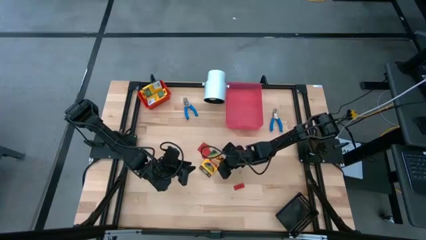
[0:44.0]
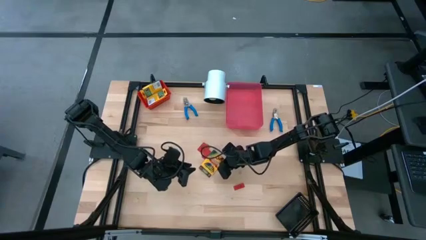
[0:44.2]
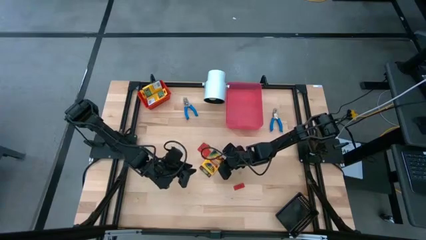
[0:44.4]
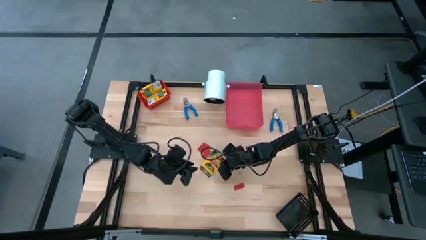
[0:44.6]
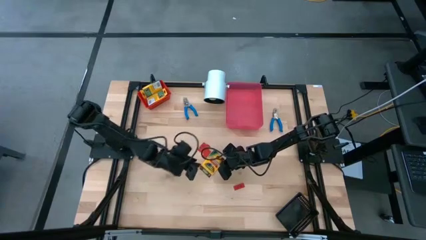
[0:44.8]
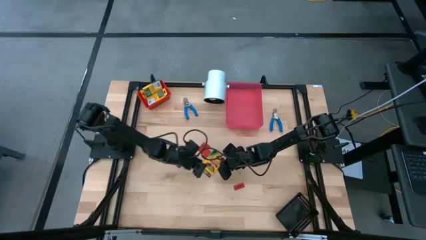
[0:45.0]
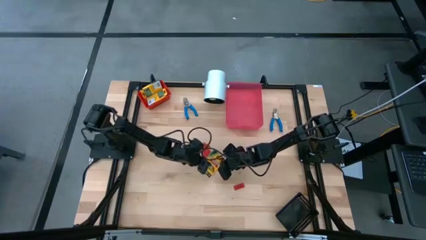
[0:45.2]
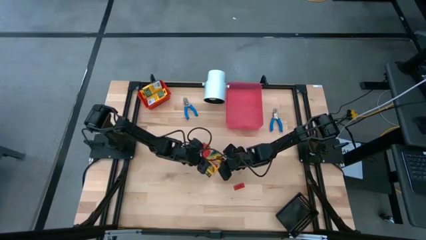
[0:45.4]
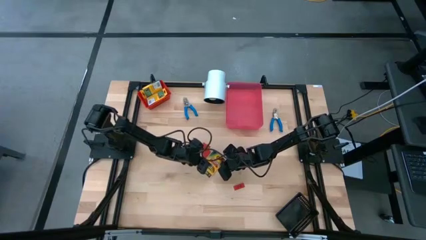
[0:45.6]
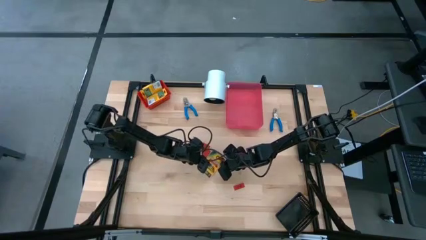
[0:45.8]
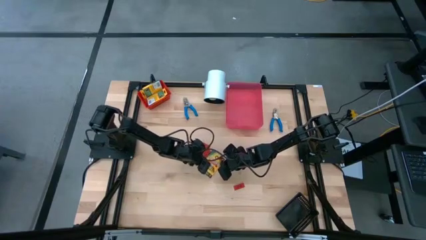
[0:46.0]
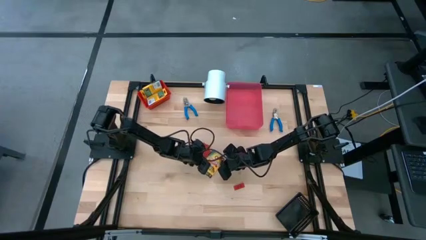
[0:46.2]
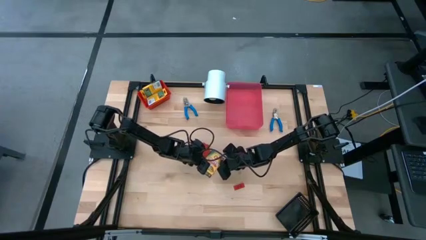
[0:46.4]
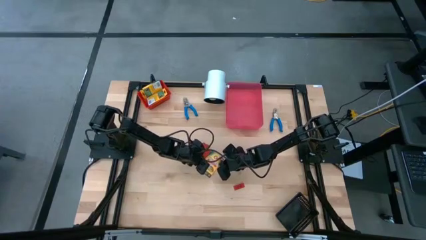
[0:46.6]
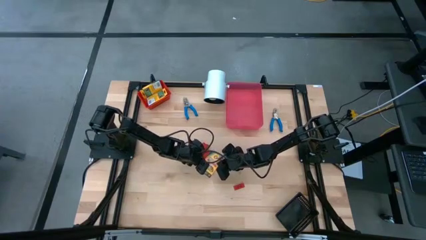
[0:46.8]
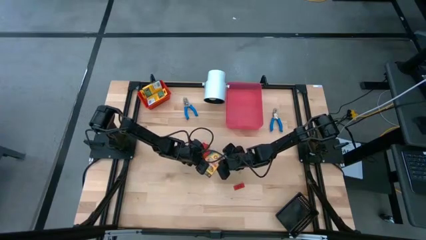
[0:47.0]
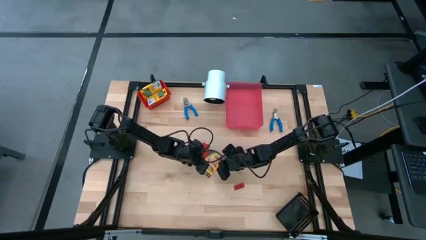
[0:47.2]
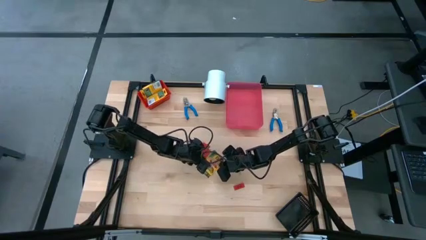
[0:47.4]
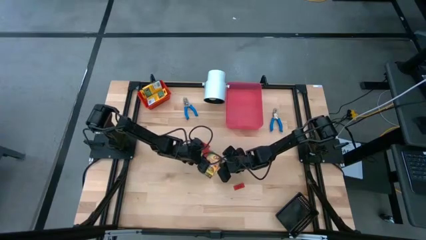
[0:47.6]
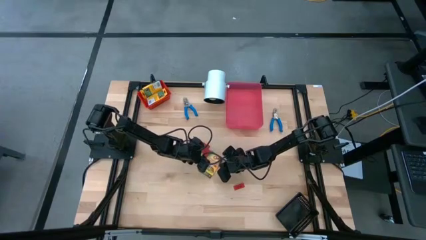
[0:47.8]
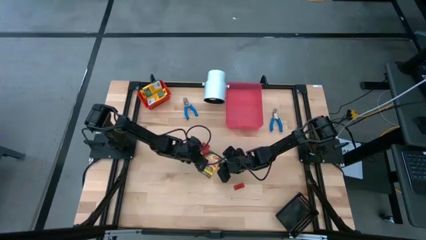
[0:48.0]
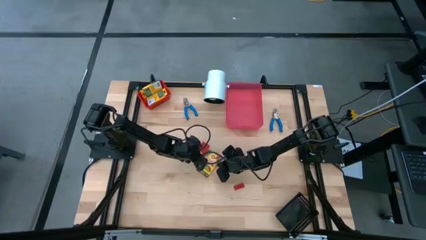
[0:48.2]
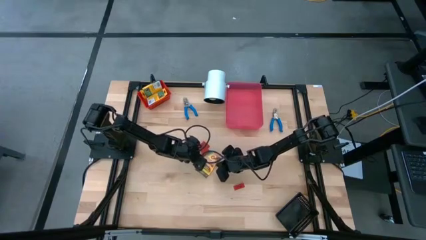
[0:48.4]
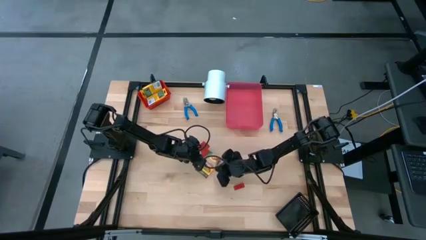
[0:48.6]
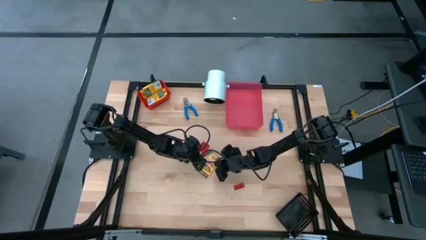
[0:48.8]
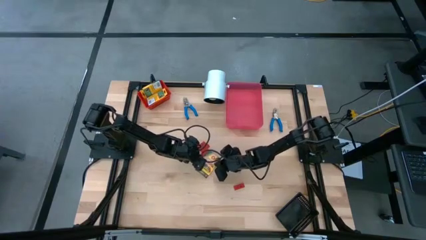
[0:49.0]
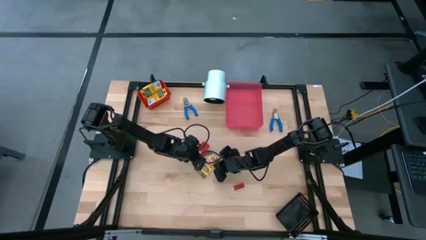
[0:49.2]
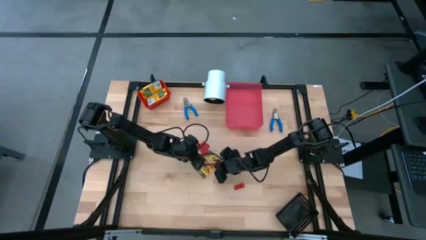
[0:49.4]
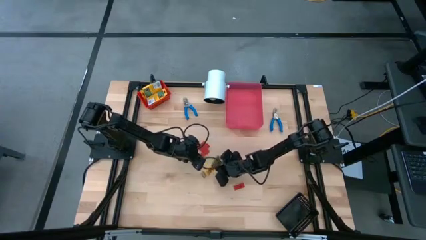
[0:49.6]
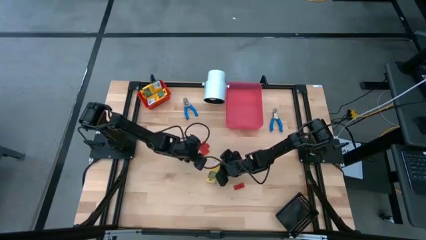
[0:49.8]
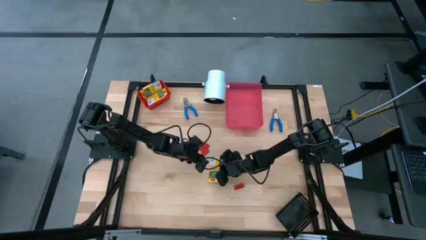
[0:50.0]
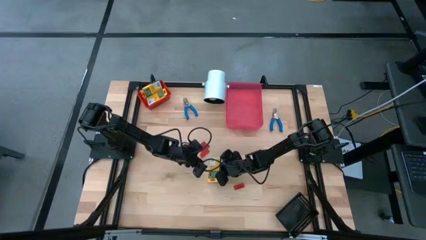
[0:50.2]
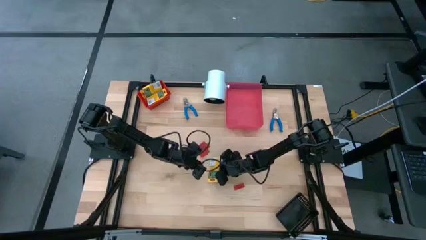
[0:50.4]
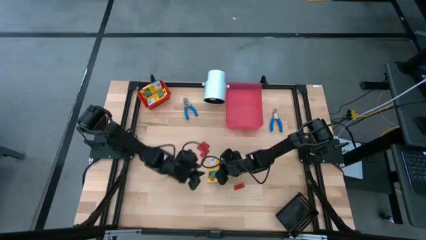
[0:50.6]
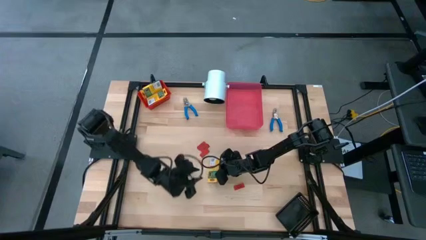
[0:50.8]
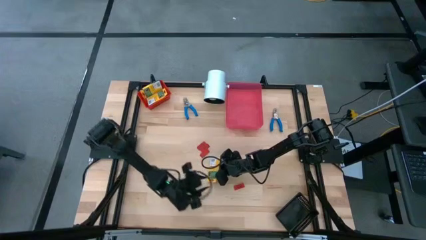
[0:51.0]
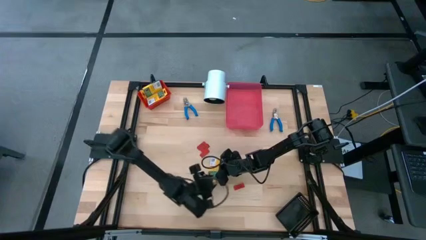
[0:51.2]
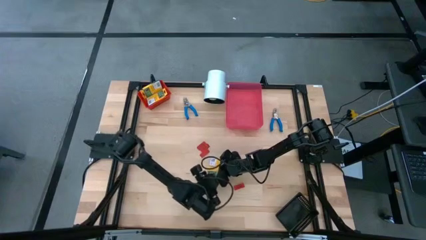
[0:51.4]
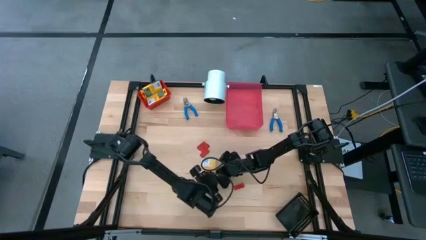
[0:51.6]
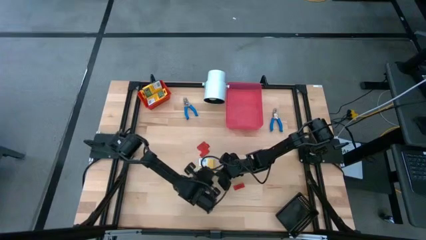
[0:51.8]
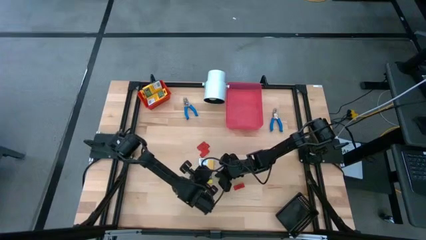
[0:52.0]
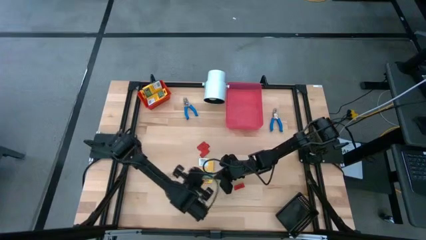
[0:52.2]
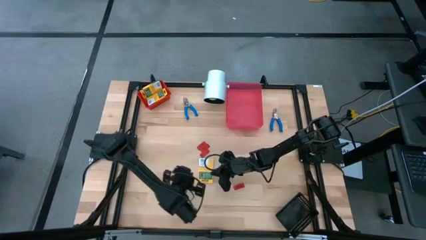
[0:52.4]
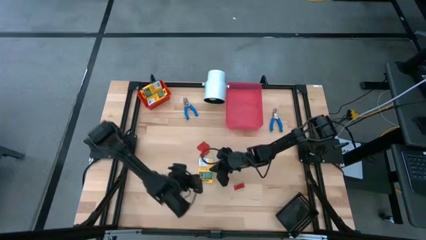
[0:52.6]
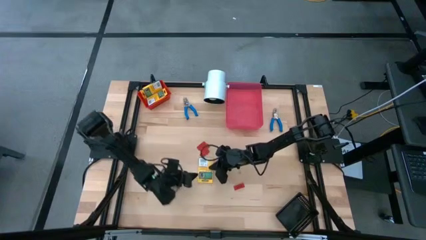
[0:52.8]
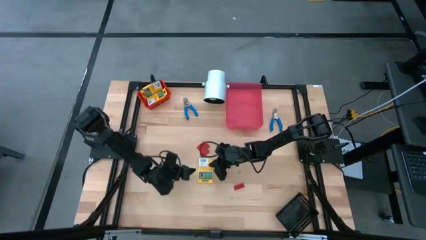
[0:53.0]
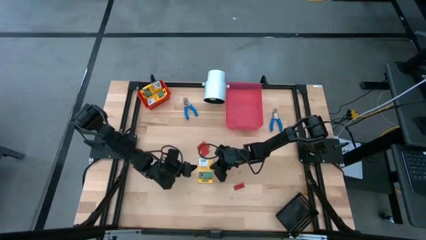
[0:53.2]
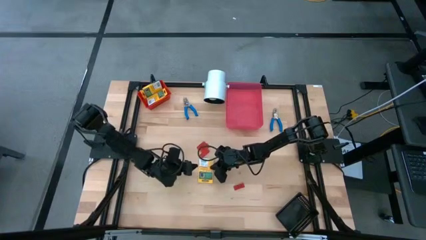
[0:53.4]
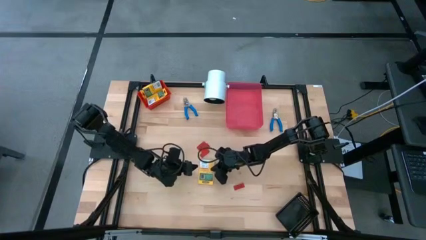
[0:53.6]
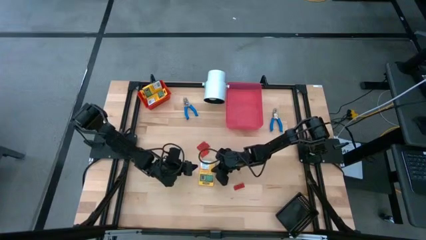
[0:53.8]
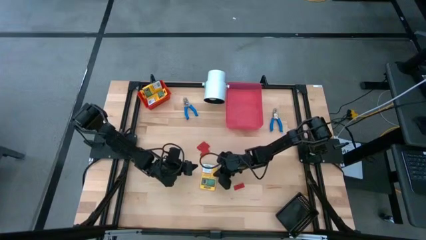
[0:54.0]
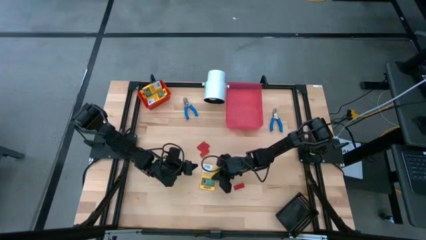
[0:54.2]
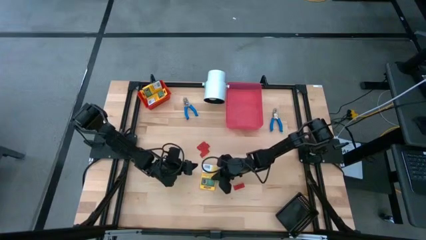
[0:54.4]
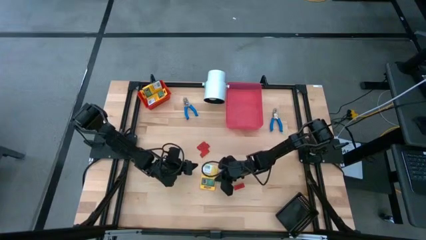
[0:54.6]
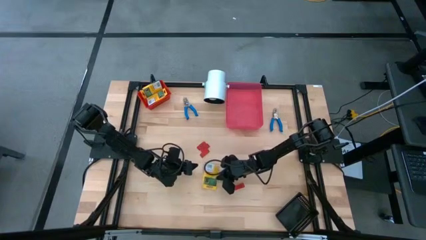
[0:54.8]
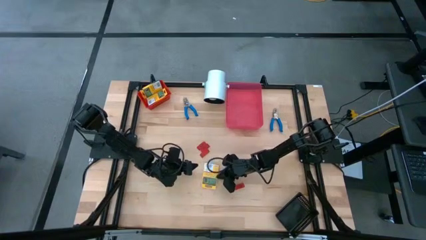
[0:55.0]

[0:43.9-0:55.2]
Task: Pick & Place School Supplies
Put the yellow crayon box into the red bin

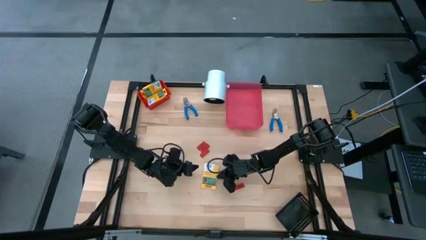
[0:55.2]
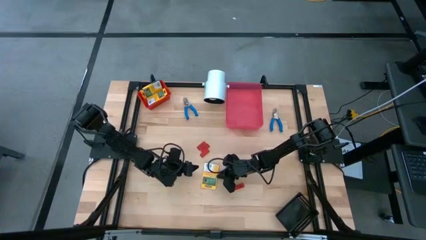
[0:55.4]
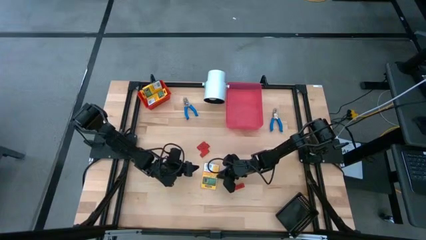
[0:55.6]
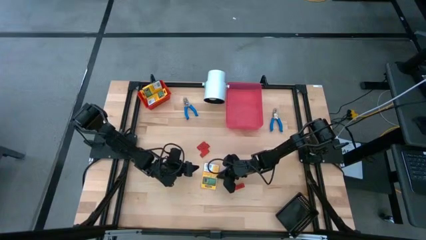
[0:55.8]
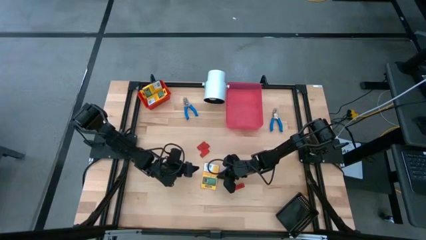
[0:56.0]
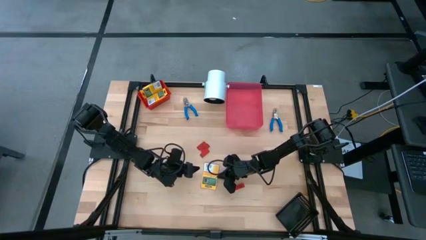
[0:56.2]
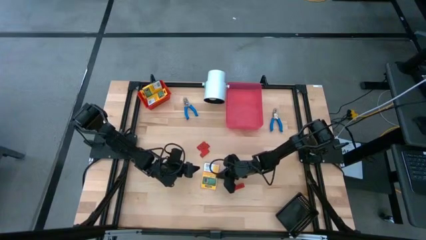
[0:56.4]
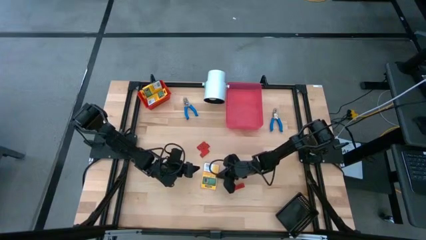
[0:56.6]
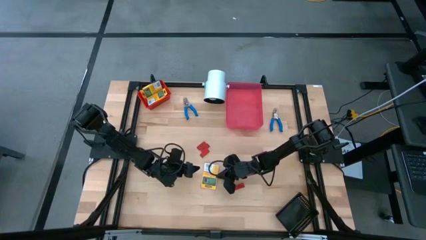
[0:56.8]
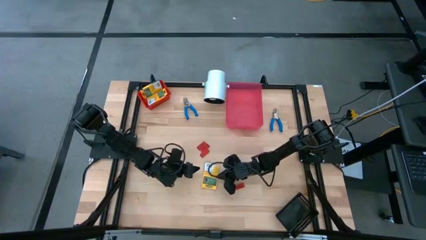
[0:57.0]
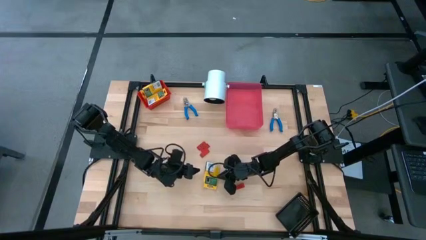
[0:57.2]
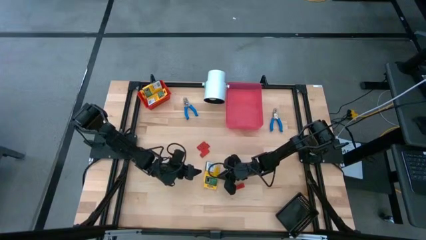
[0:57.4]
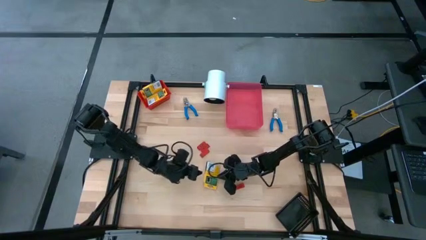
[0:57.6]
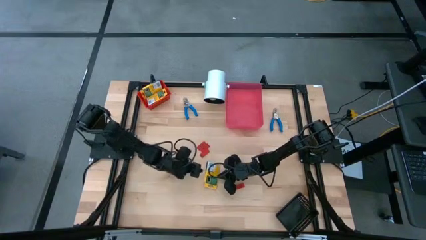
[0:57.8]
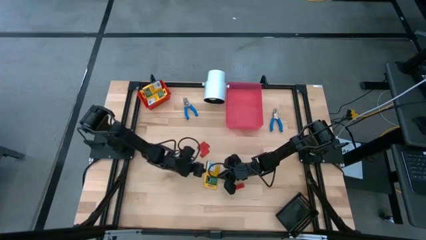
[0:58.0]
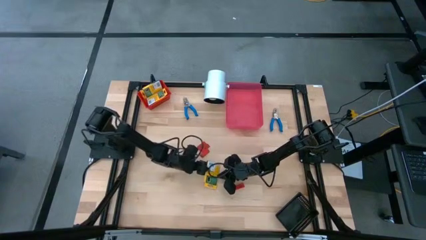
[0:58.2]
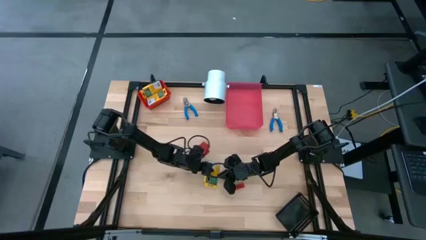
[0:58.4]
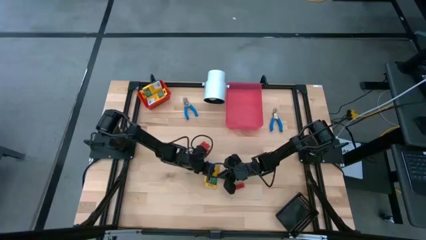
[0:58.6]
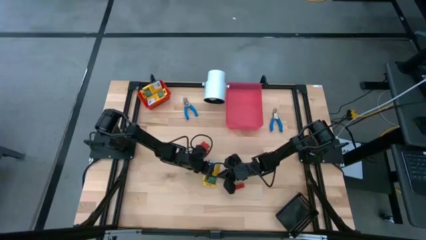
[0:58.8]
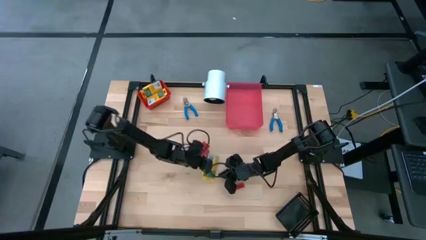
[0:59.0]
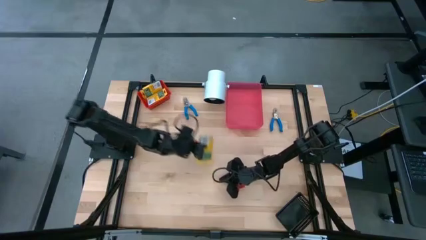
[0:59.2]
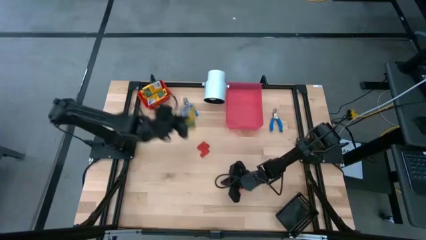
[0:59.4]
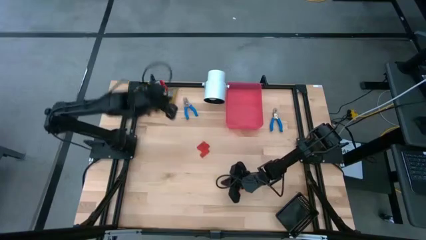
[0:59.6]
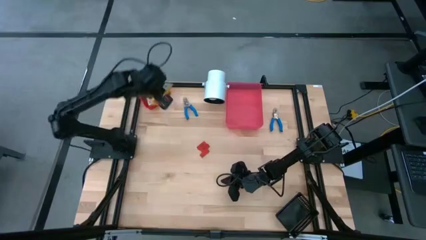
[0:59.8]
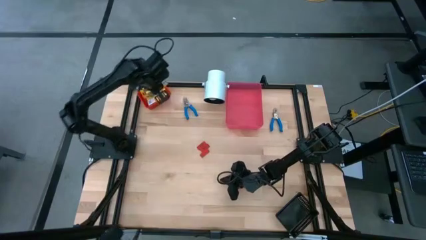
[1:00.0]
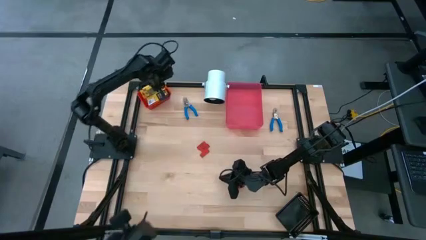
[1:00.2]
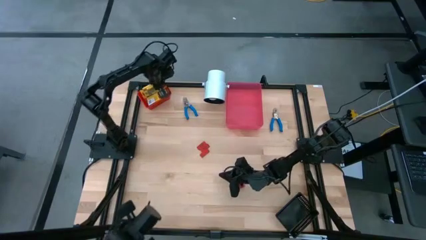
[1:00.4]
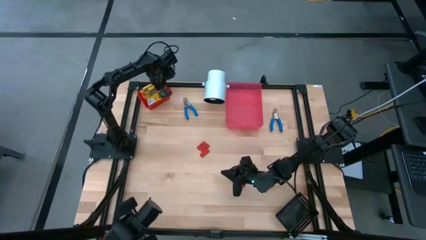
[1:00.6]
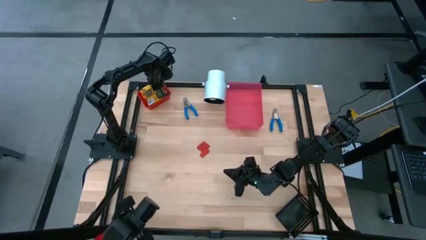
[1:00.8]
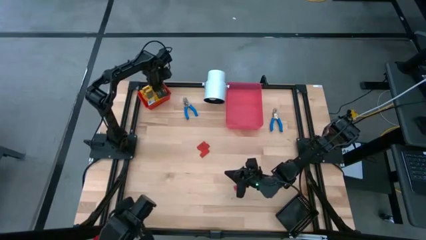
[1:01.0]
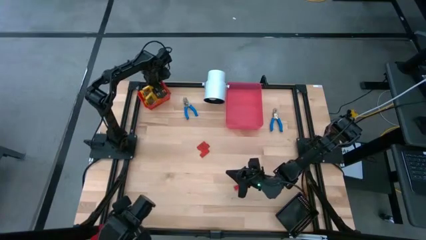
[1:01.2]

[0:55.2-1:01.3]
Put the yellow crayon box into the red bin
